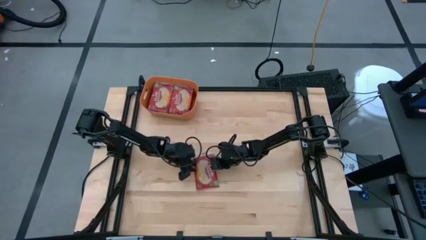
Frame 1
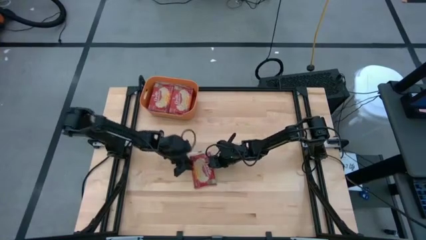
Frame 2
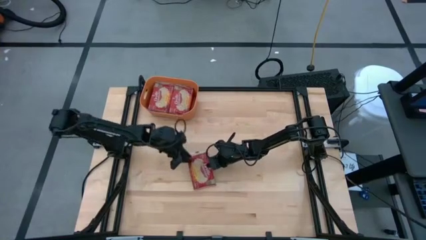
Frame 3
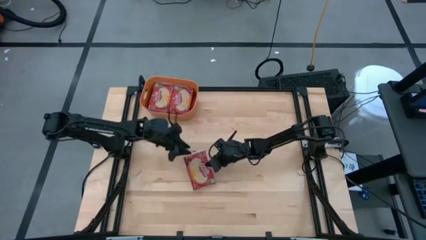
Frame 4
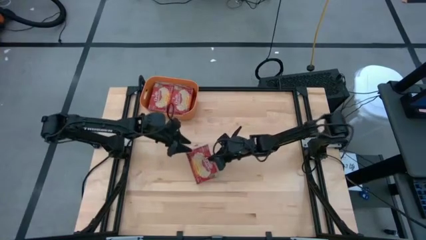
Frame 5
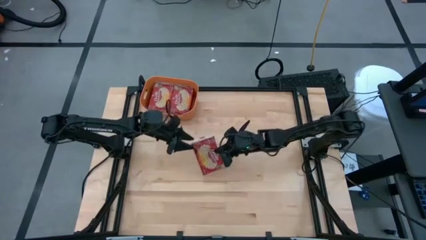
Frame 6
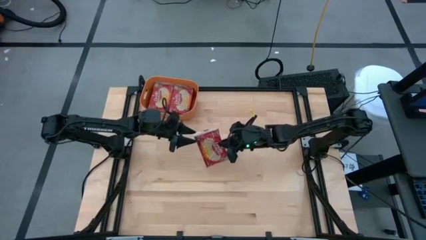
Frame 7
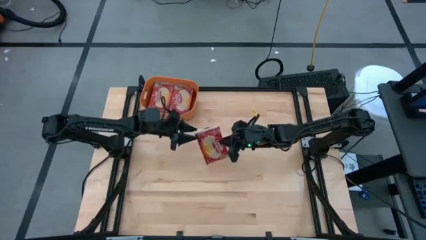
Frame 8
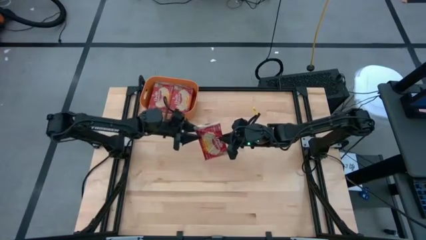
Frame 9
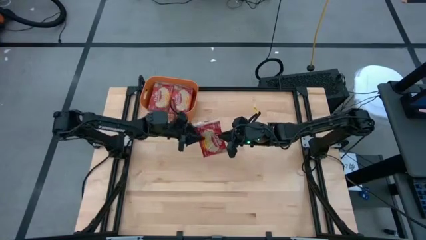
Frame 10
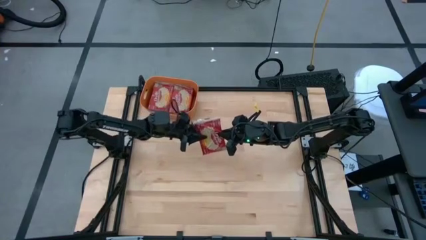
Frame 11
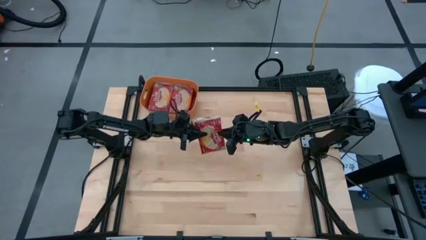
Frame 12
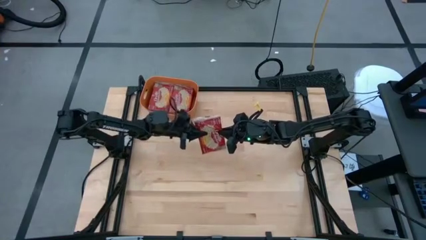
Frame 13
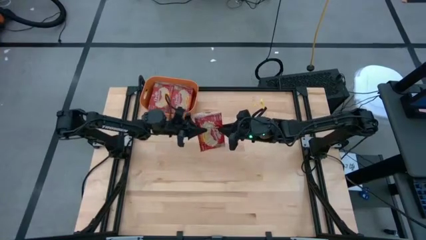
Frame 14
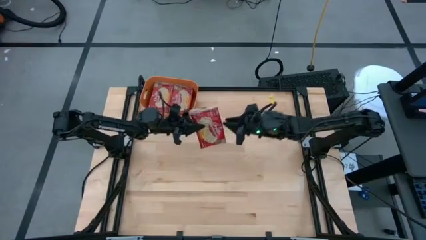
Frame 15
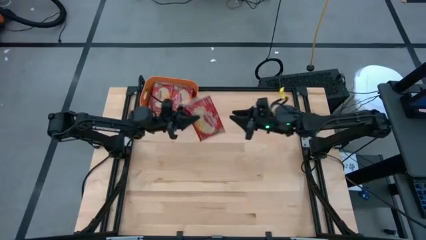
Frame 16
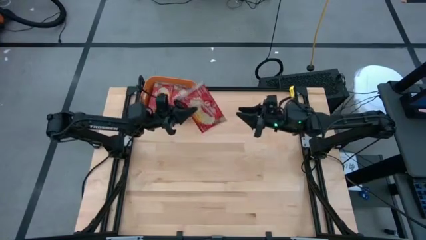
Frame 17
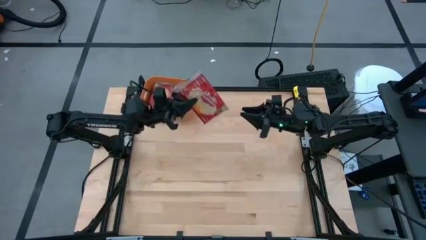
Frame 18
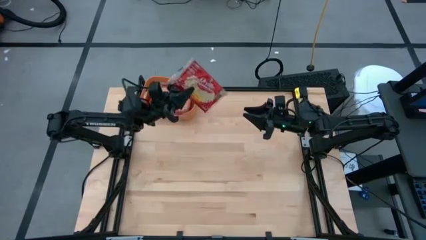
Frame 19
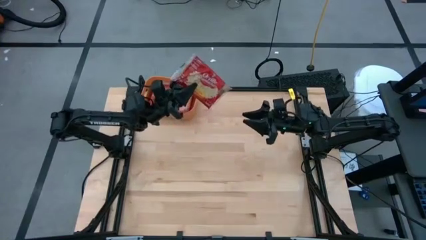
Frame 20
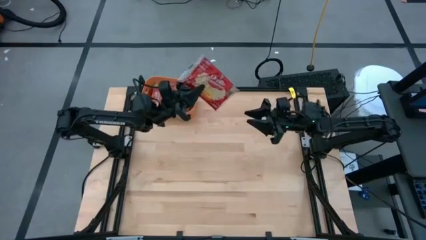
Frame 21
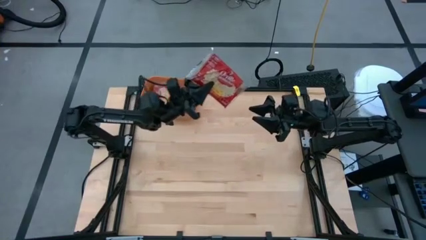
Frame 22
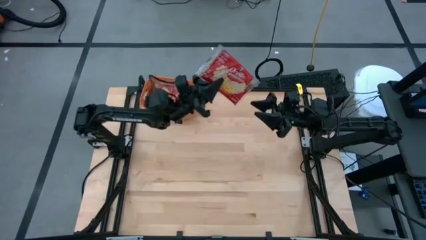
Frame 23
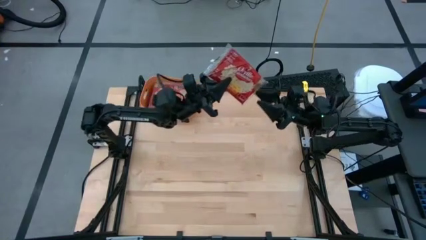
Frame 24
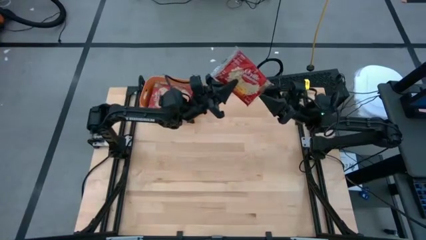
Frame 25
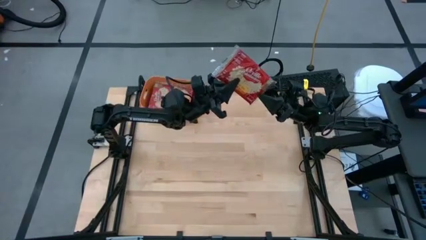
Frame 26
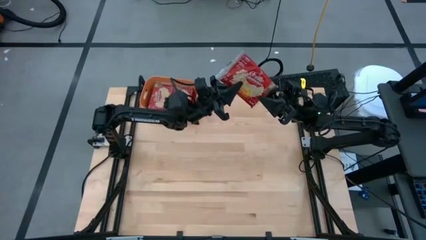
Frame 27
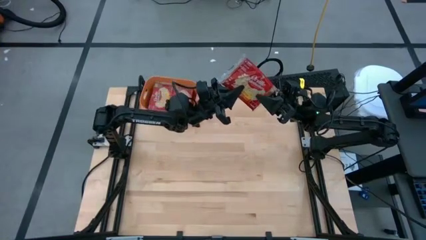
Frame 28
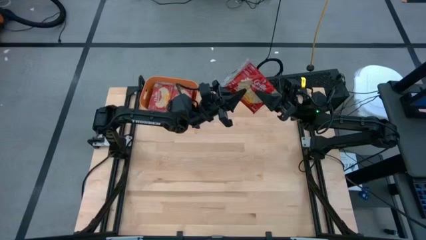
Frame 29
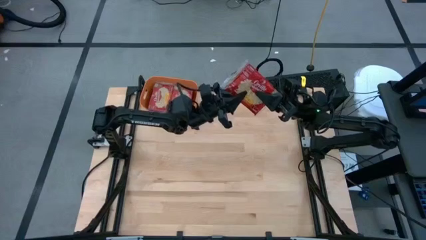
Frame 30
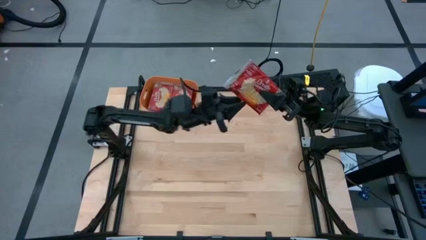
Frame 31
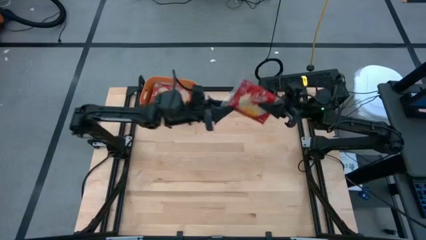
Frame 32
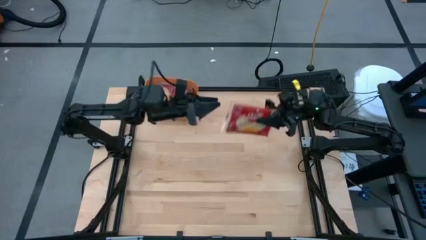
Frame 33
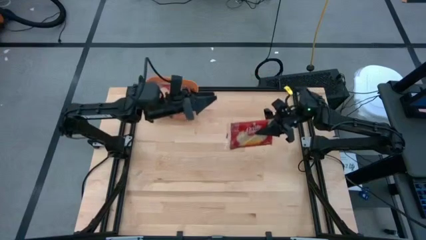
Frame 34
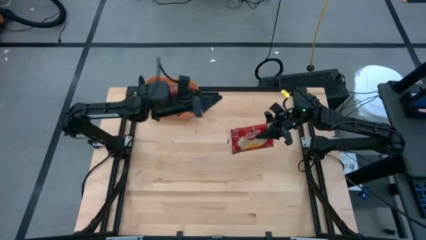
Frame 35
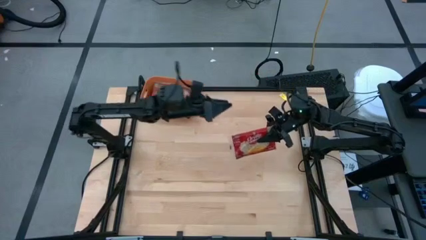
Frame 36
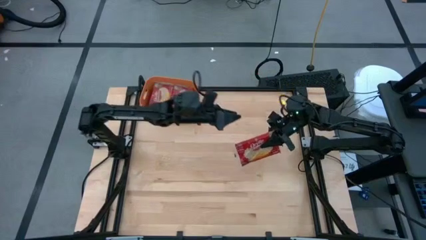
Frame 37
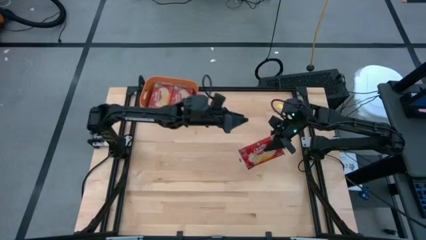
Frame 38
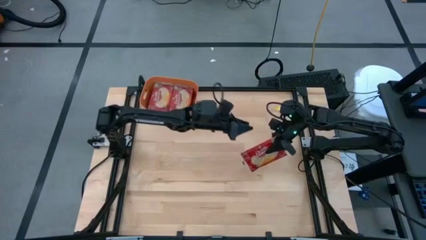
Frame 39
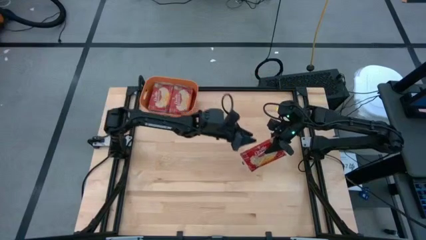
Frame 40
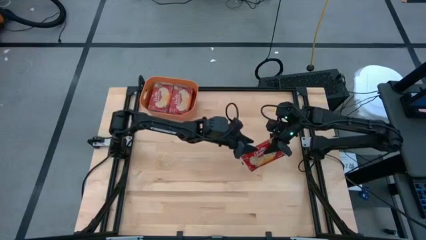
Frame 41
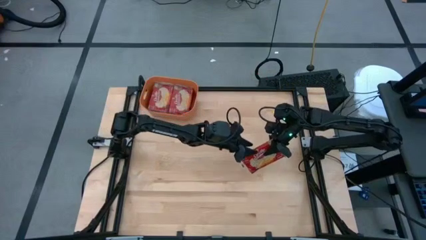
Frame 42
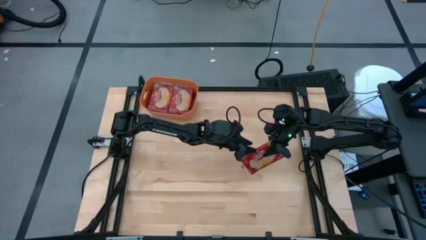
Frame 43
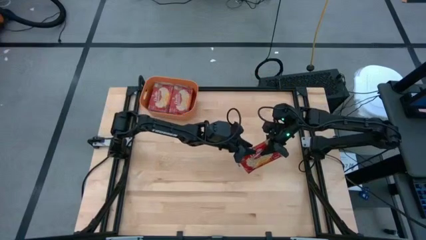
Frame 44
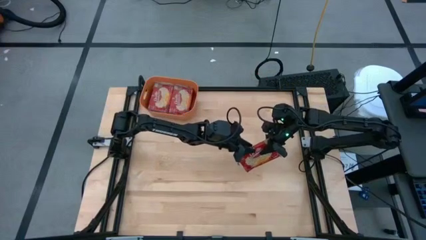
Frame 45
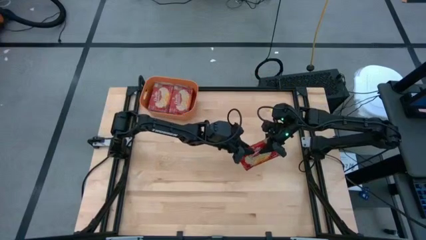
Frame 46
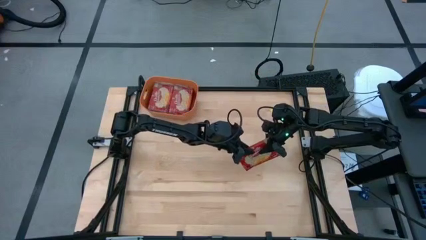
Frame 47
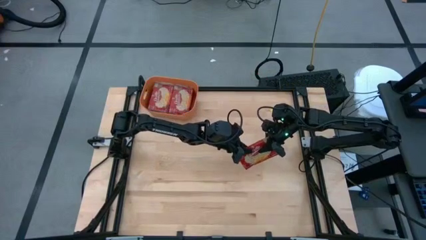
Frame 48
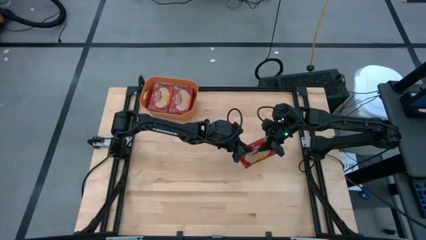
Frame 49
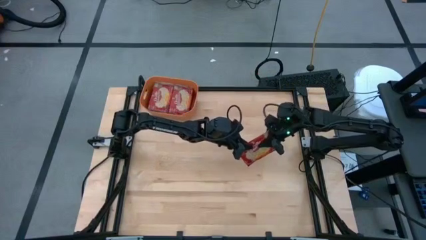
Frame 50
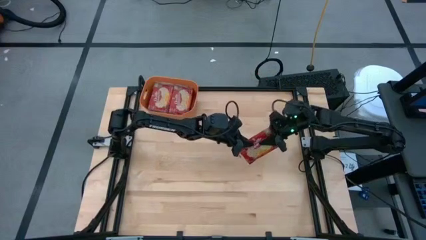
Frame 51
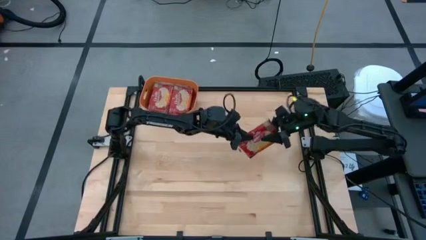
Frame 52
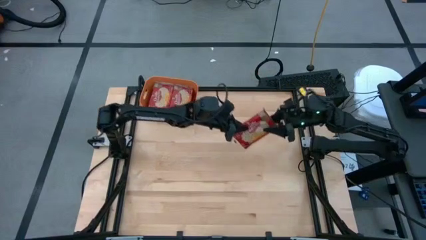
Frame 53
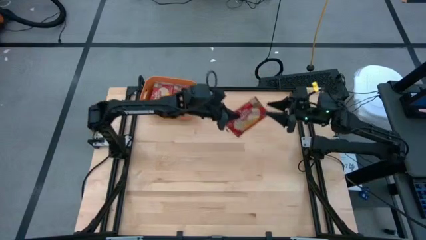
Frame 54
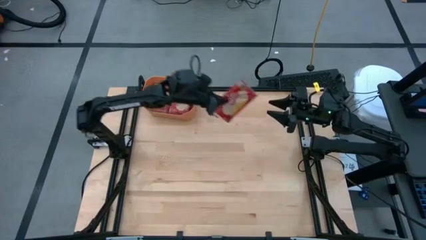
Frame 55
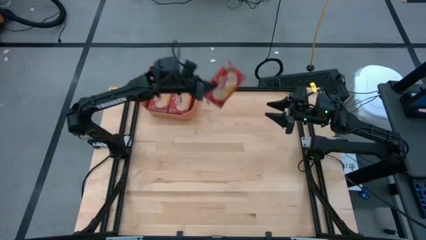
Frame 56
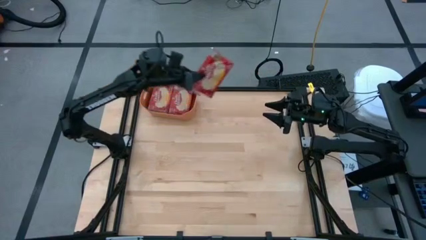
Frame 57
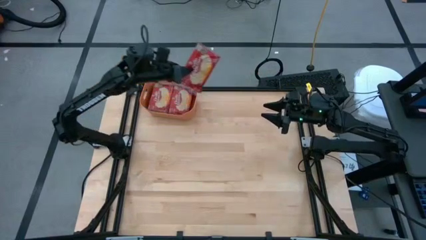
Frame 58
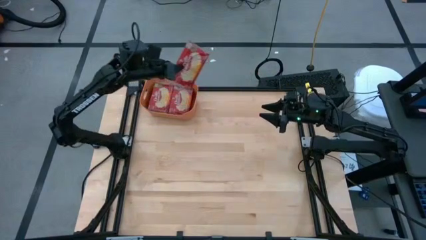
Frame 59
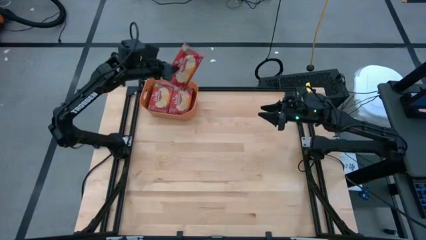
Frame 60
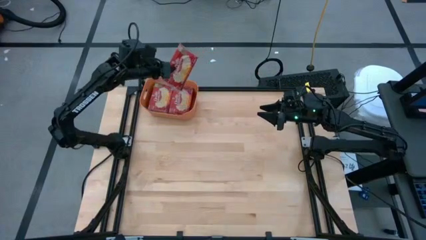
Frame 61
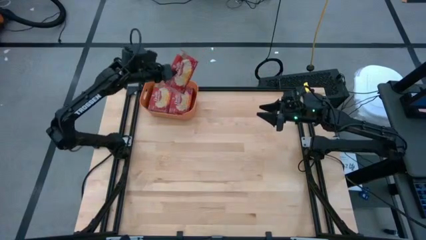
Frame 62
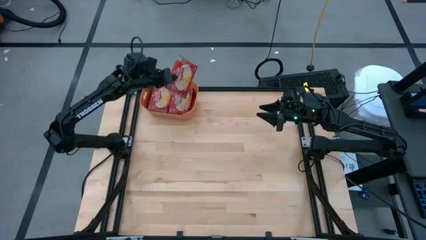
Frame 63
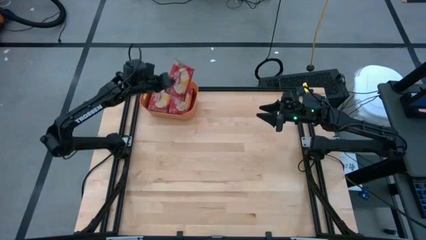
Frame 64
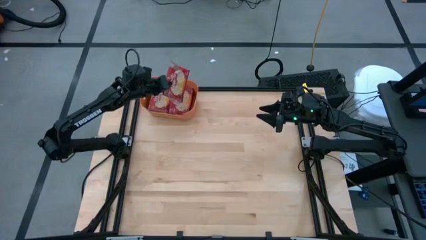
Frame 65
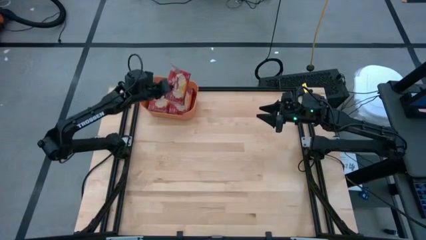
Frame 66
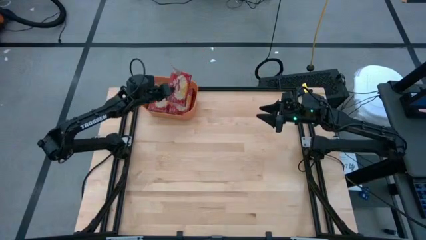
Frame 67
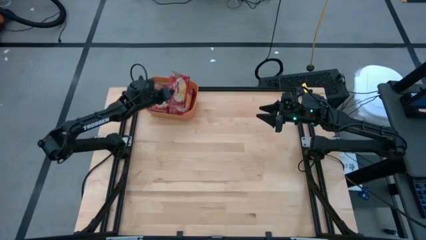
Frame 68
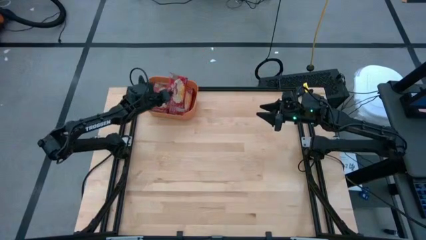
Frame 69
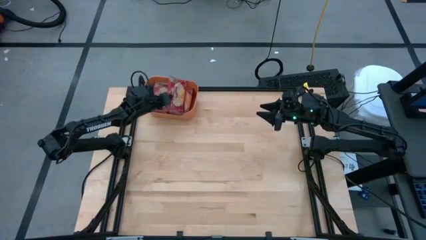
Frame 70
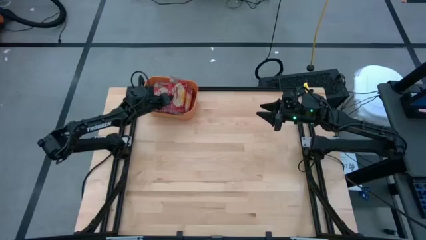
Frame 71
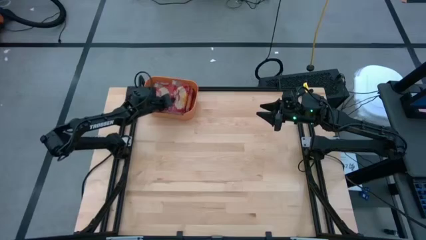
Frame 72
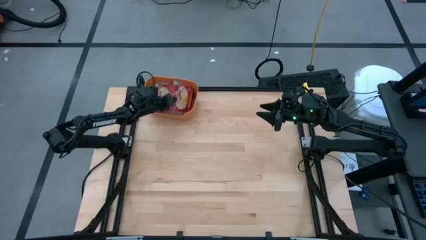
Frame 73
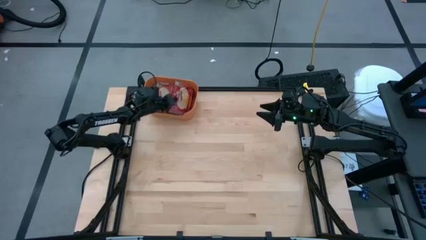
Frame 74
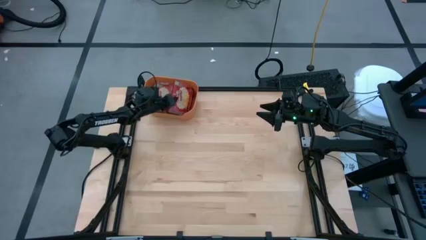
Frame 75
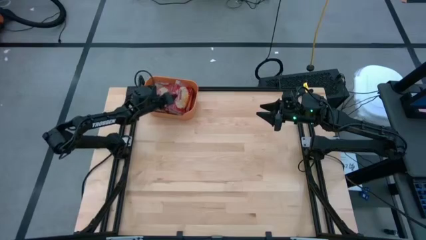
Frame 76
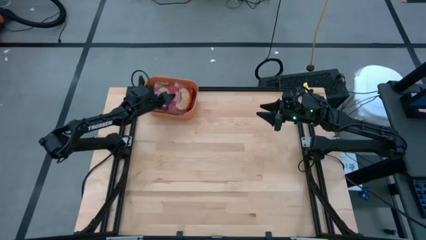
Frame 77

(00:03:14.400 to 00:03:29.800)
Task: Sort popcorn bags into baskets
Stack the red popcorn bag on top of the red popcorn bag in the orange bin
